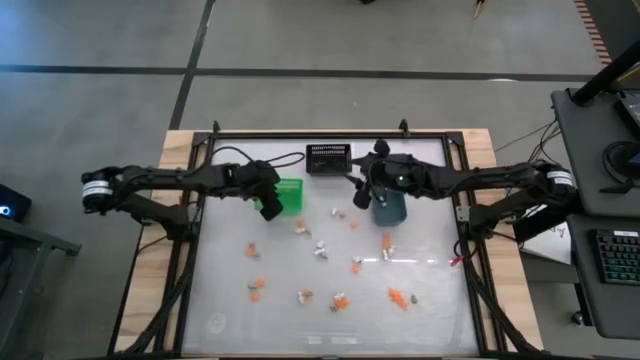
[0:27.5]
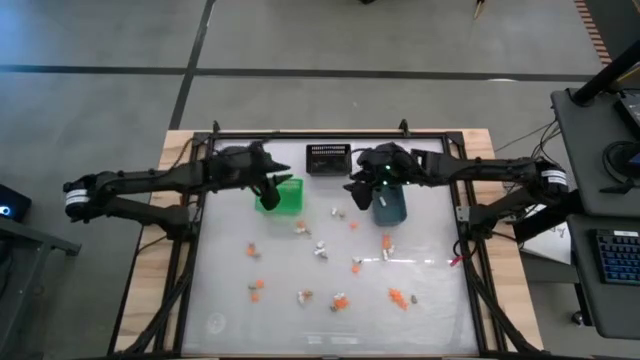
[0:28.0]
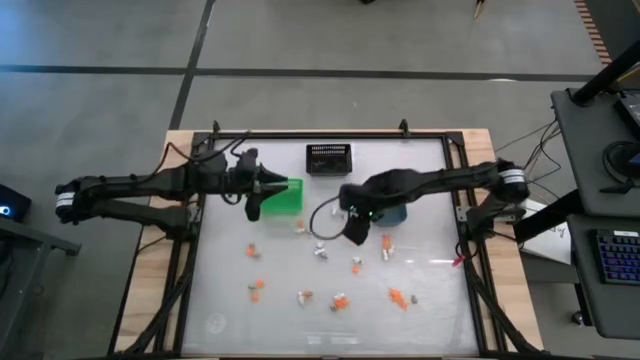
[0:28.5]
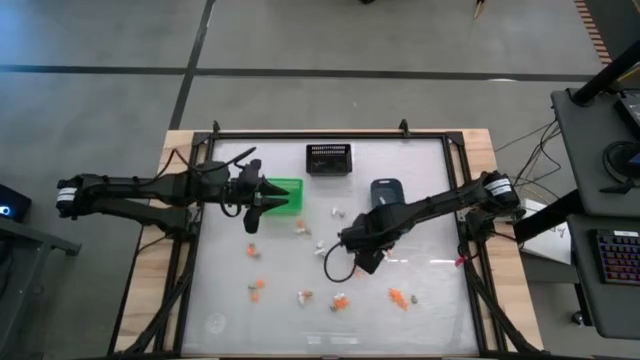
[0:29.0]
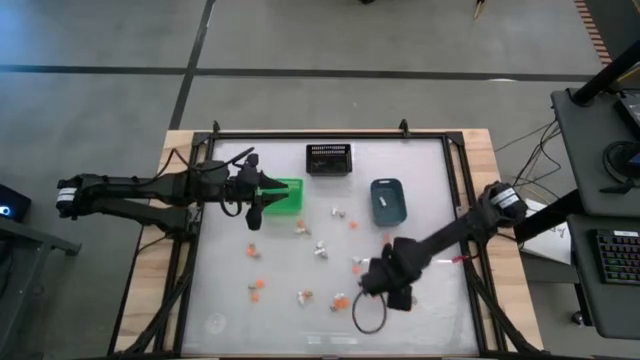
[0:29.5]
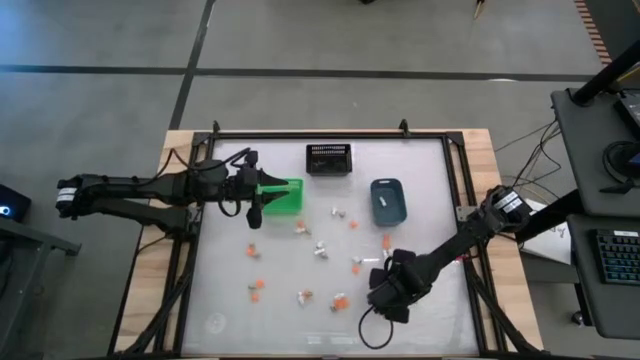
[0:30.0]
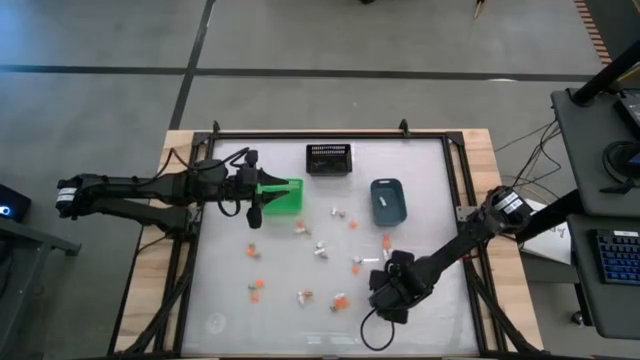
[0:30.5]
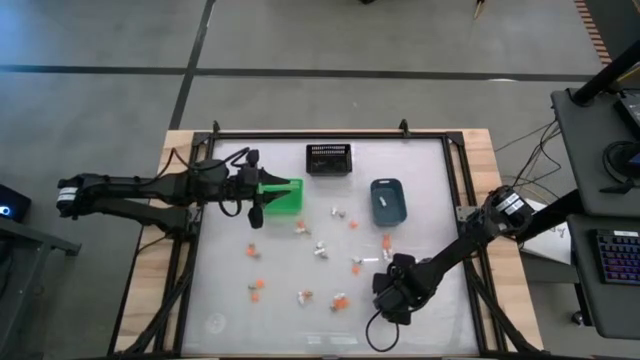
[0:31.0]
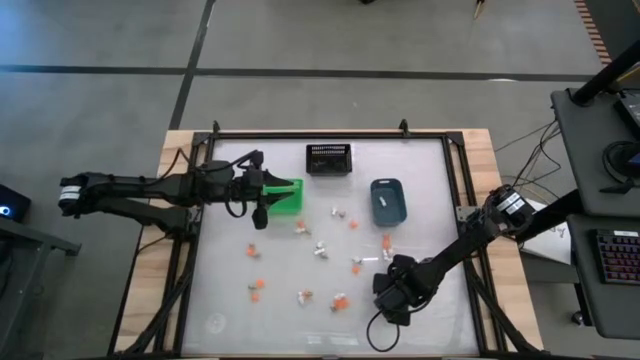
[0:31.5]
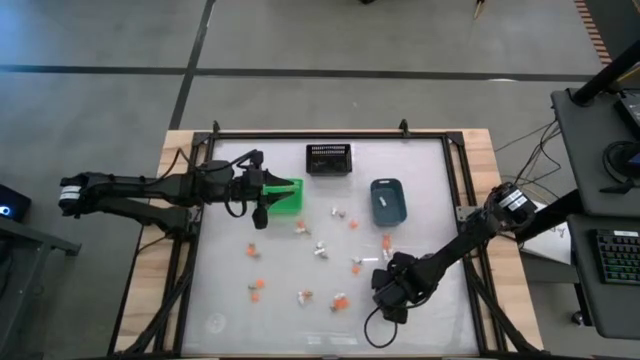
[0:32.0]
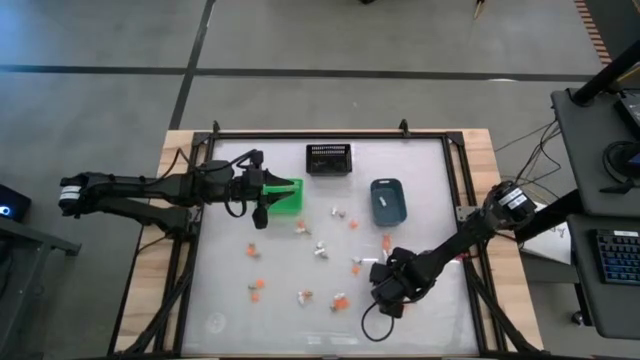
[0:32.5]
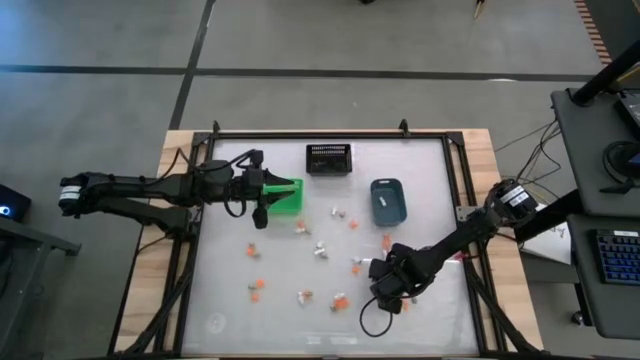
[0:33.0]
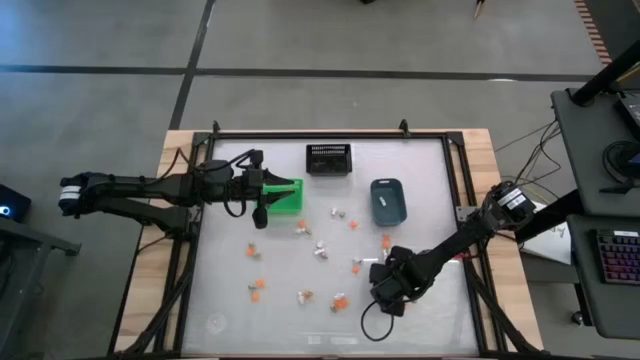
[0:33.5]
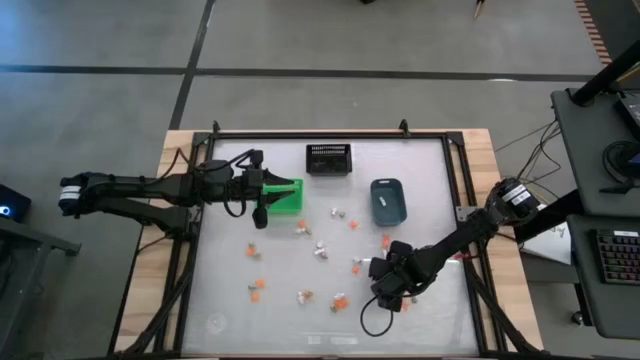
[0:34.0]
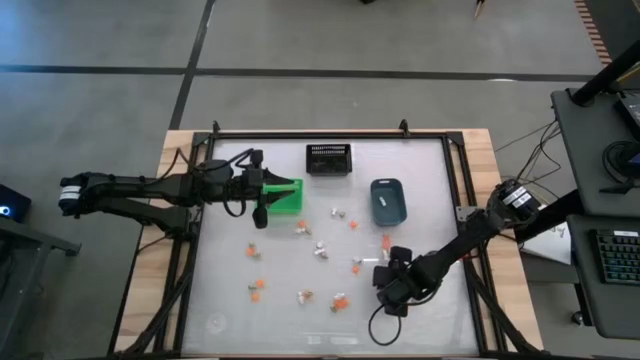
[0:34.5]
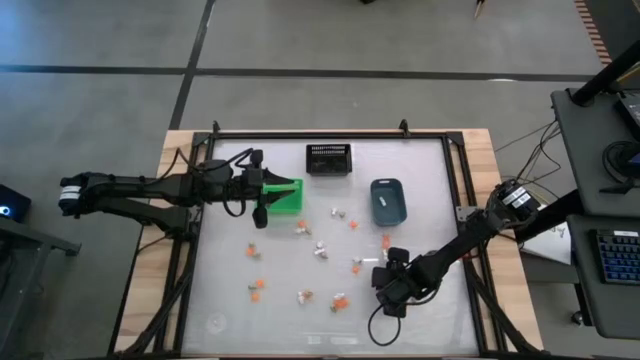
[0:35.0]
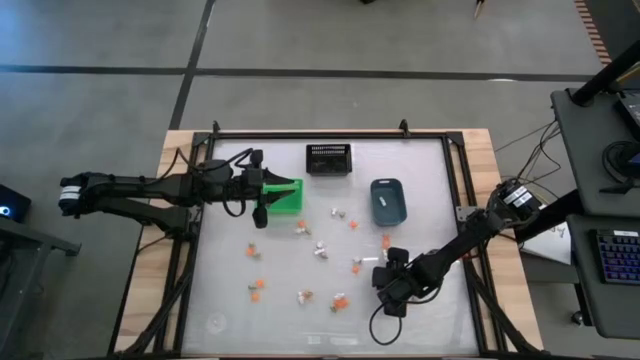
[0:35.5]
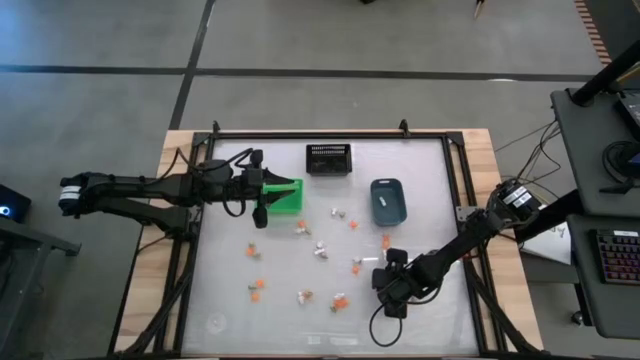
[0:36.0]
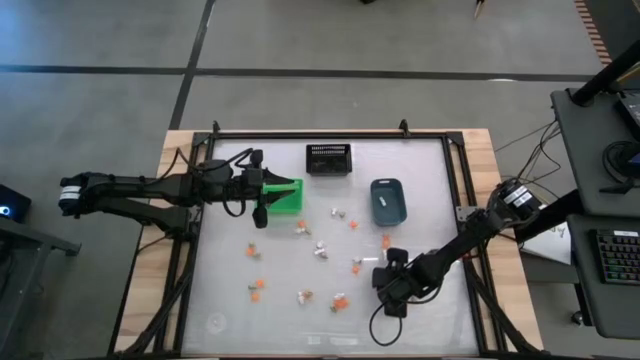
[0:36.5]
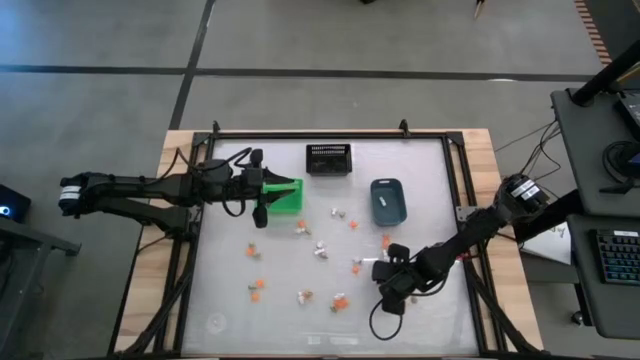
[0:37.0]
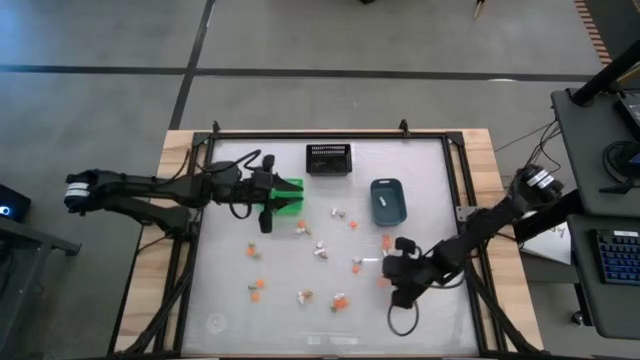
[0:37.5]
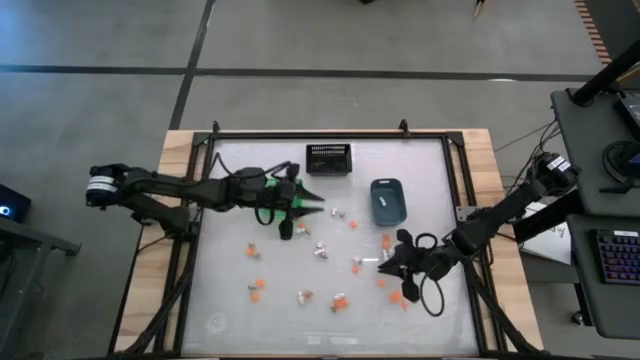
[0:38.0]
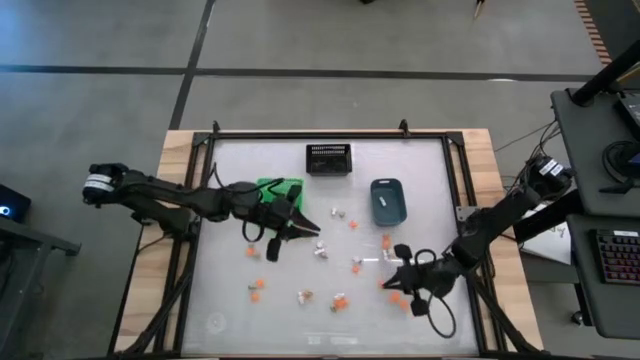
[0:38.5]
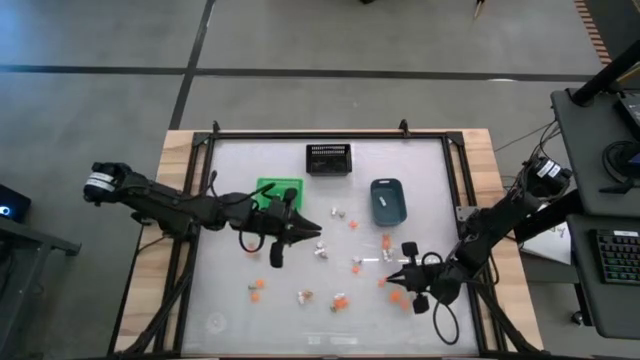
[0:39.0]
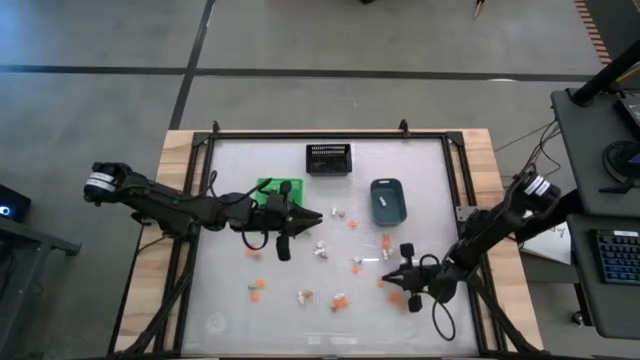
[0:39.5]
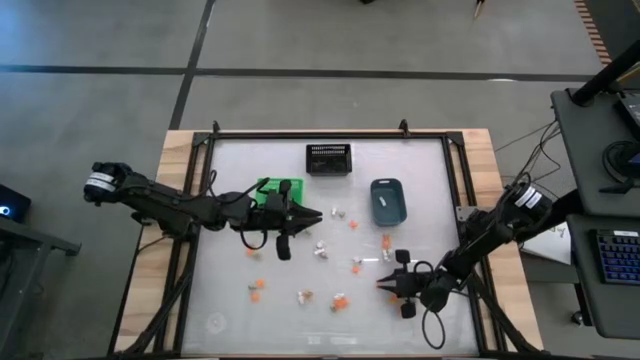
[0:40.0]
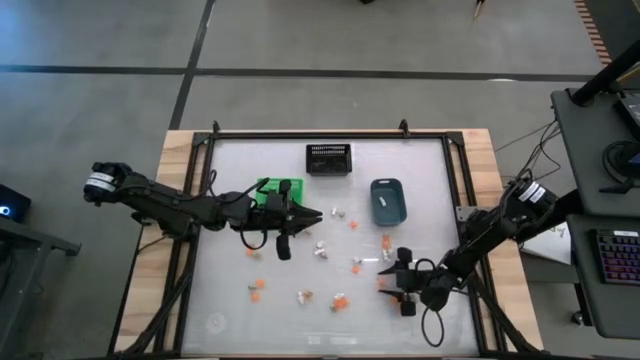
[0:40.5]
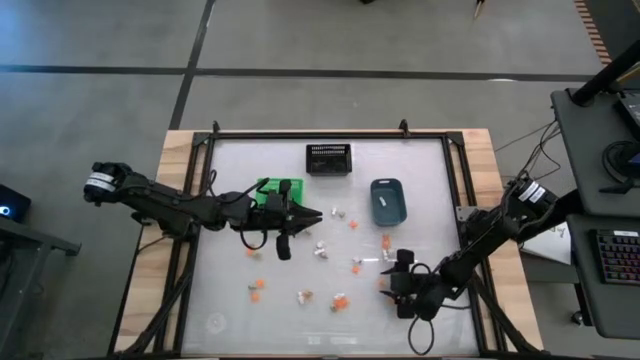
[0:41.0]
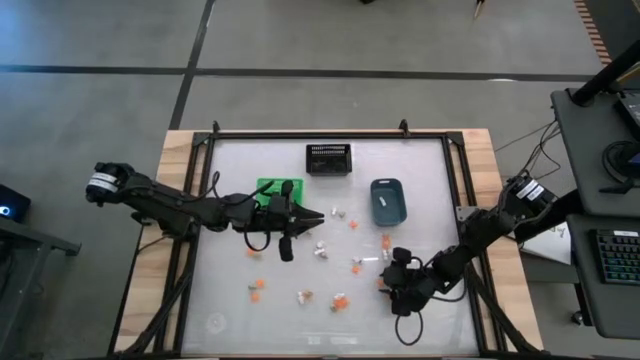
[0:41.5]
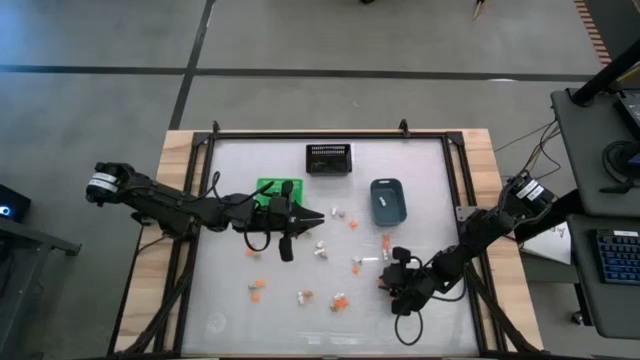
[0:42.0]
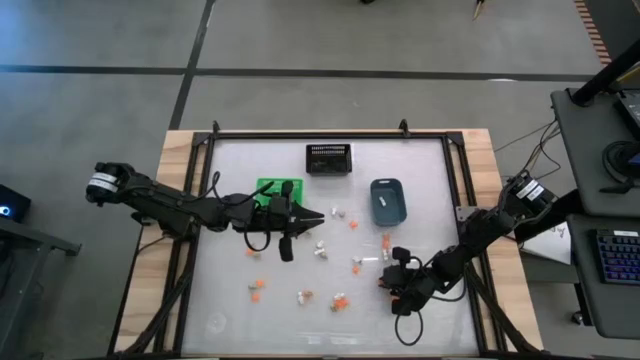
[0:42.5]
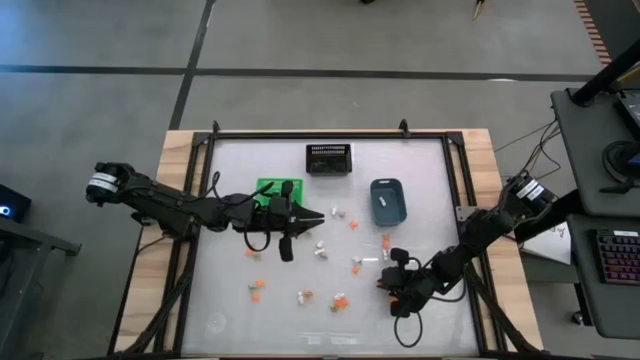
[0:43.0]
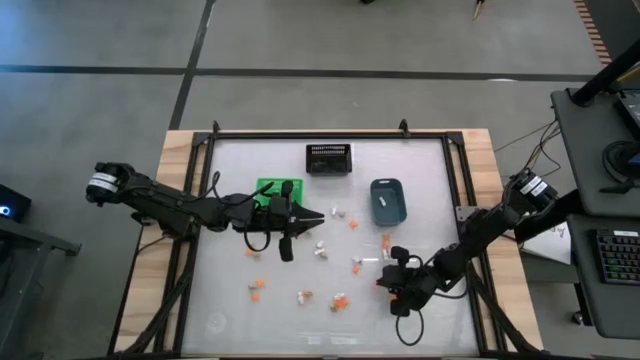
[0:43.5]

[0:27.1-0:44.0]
Task: Sort Halloween decoration
Put the orange spider toy into the black bin

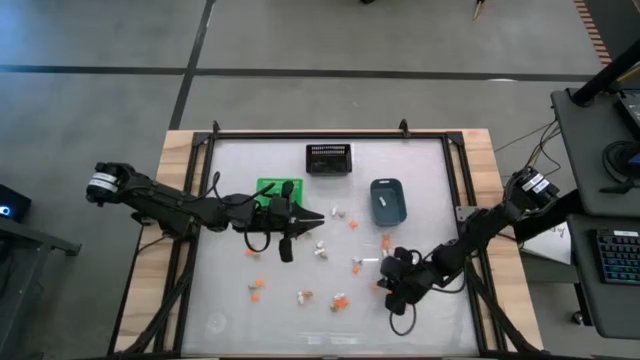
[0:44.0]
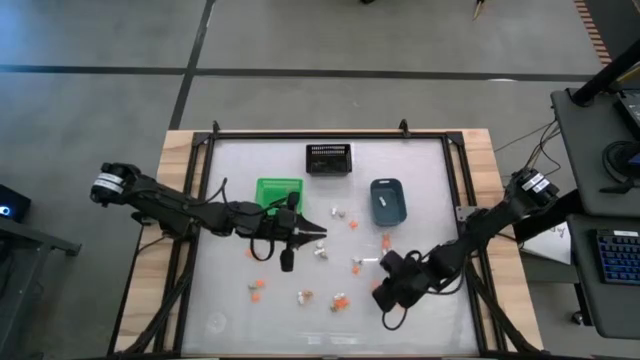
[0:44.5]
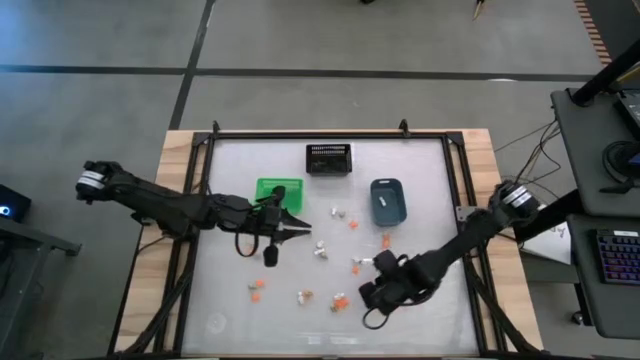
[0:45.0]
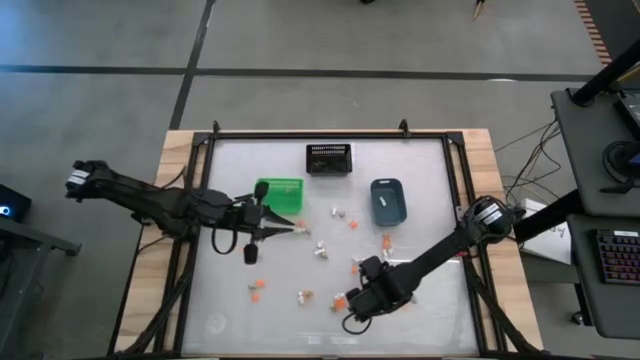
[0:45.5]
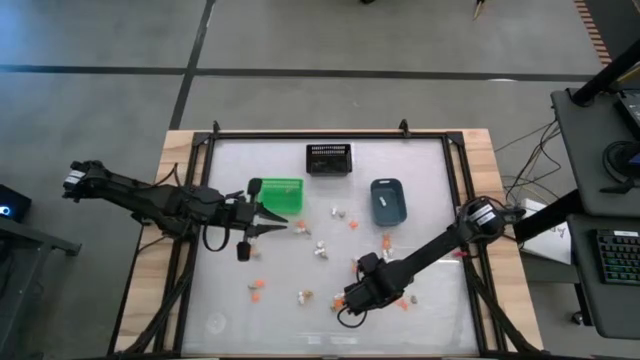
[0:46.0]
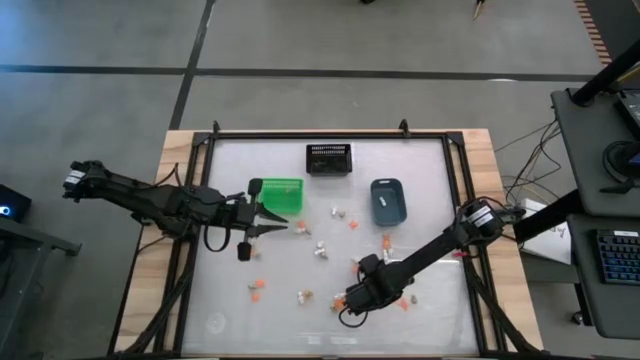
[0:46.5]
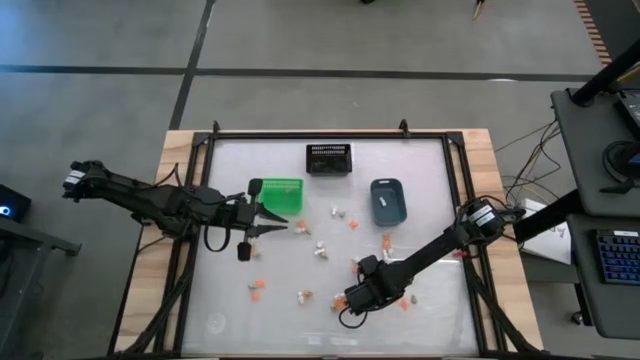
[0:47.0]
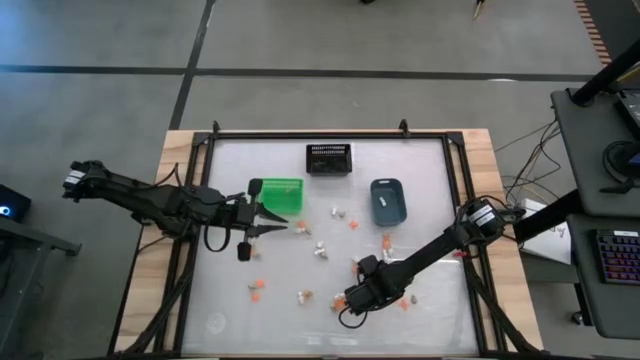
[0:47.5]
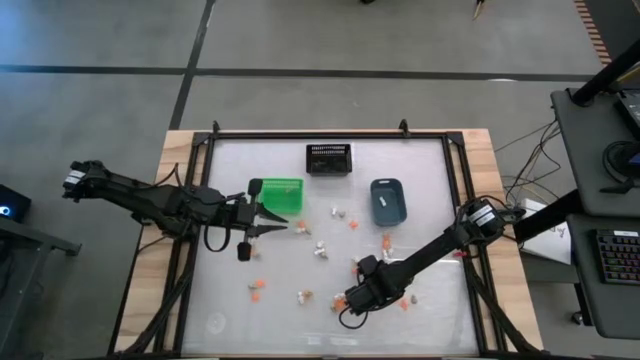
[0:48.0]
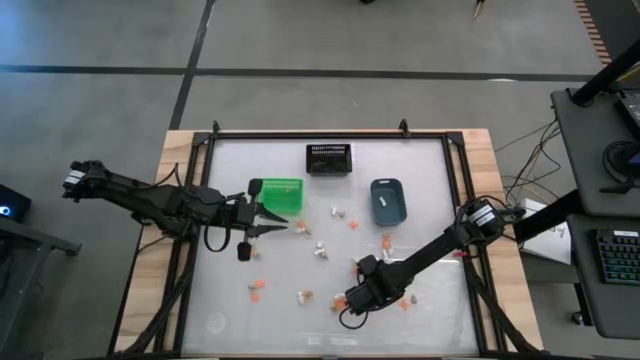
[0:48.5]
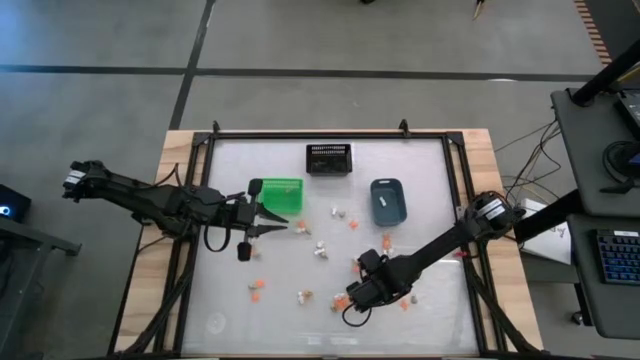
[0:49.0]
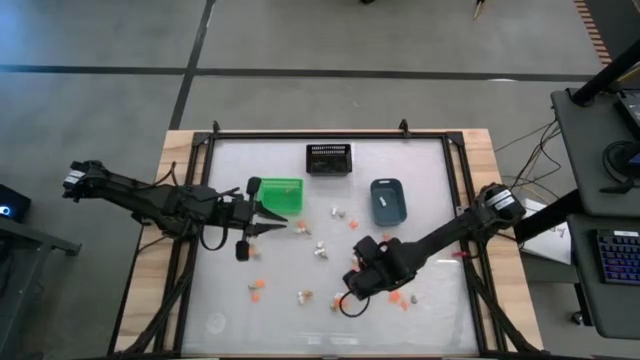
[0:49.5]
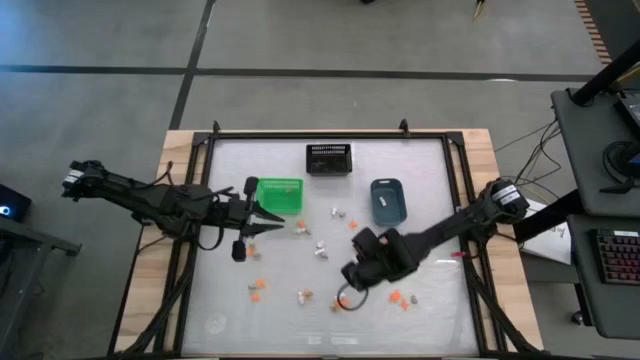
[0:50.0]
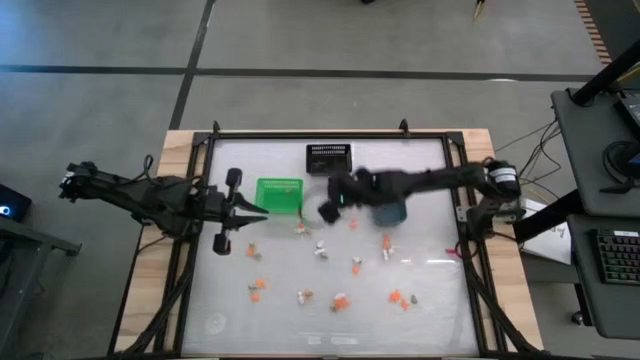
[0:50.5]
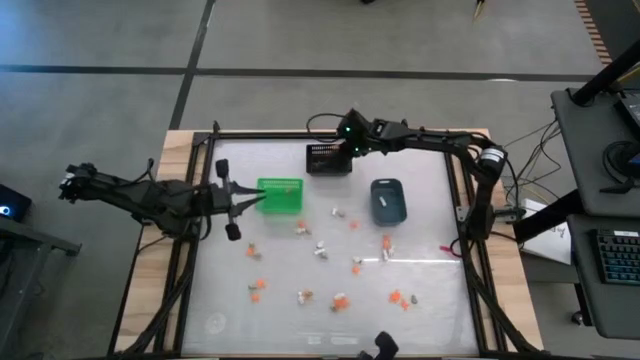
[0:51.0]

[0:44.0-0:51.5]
Put the orange spider toy into the black bin
